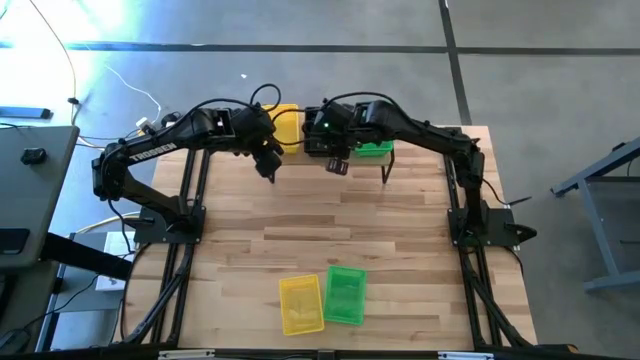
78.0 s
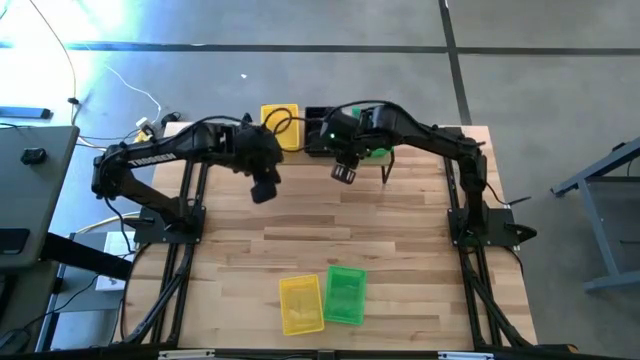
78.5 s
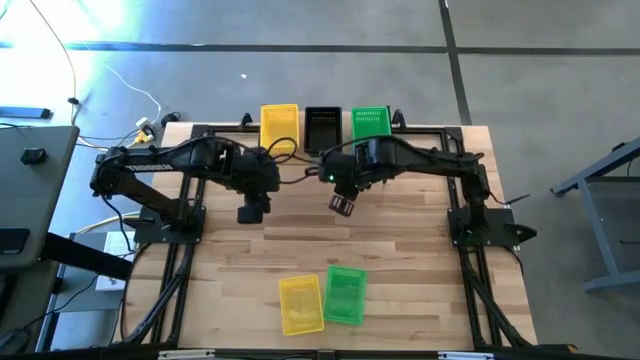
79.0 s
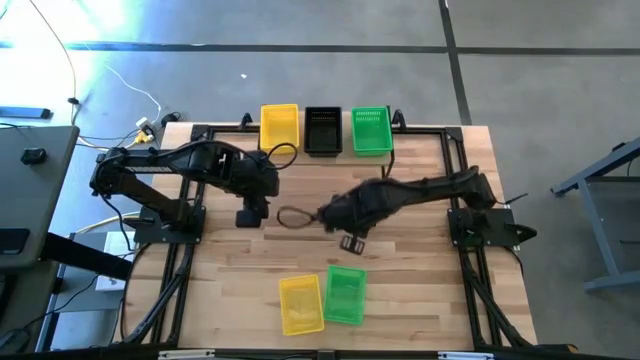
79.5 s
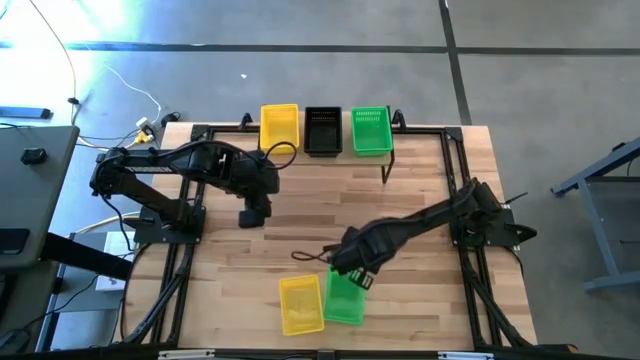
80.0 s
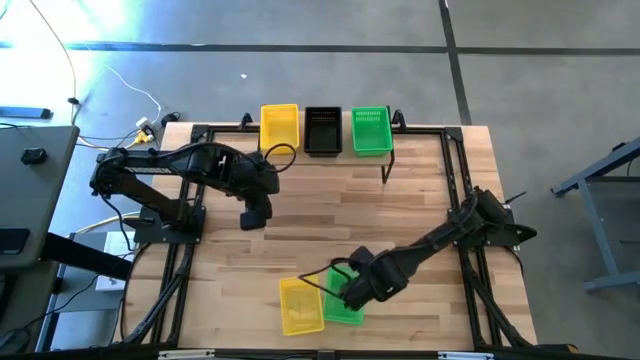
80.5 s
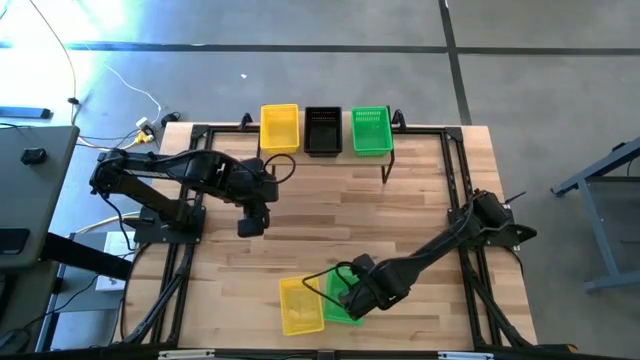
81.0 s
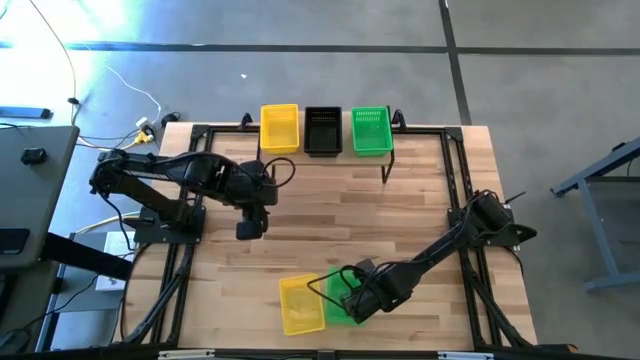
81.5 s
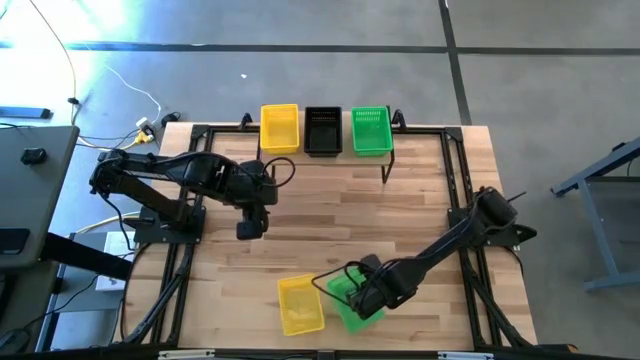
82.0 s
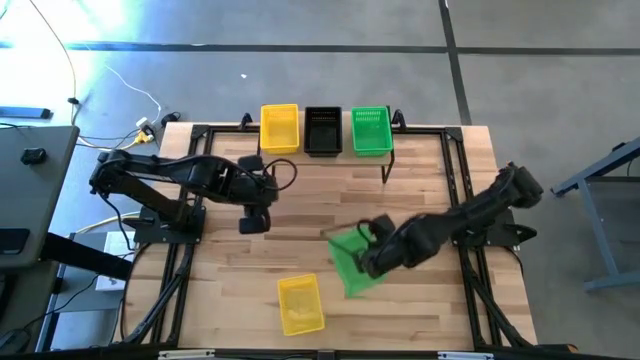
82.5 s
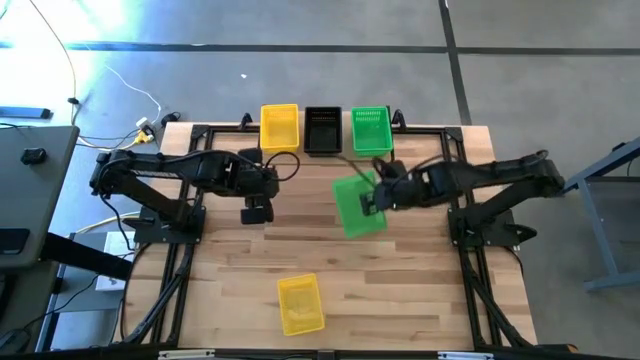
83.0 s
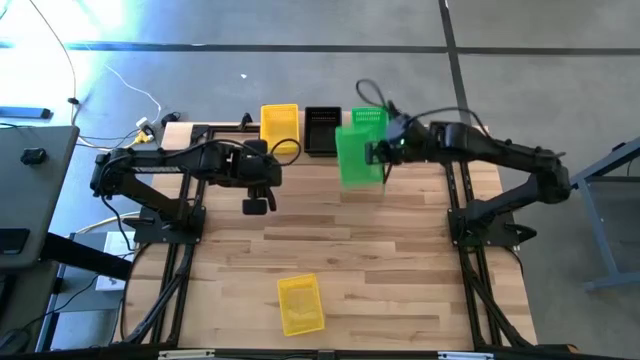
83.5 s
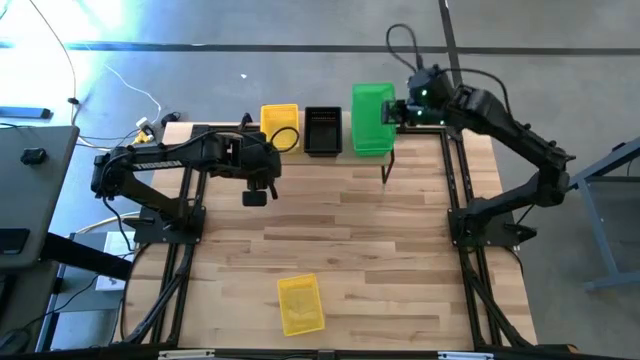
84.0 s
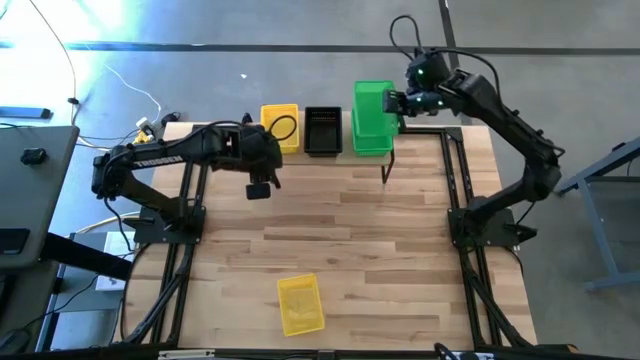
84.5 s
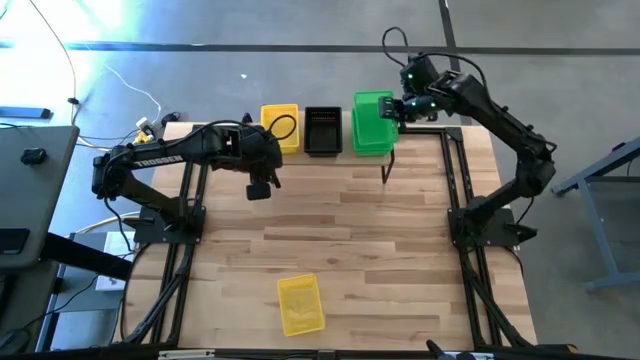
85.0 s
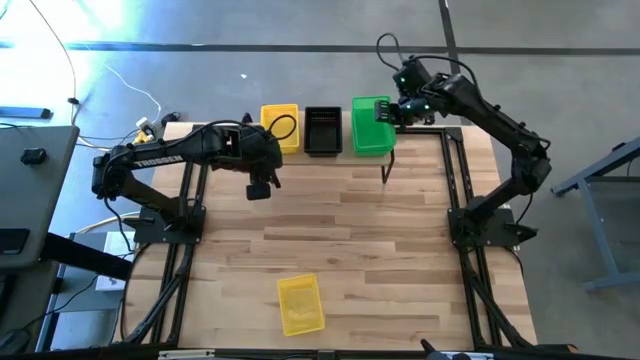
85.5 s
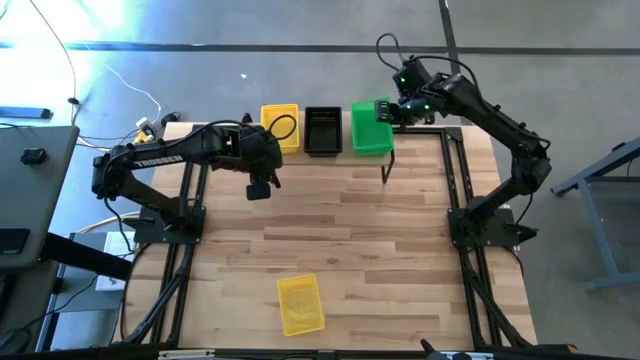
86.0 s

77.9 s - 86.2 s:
Task: Stack baskets on shelf by color
Stack the green bin on the green bin on the shelf

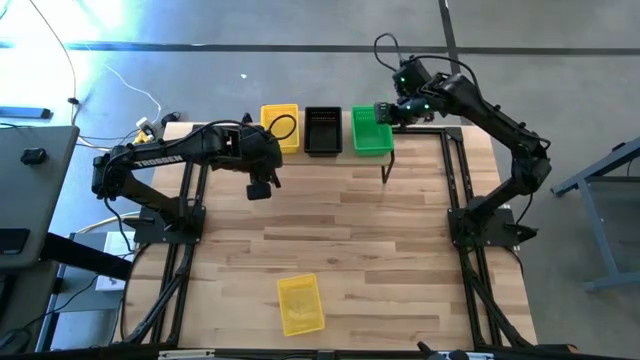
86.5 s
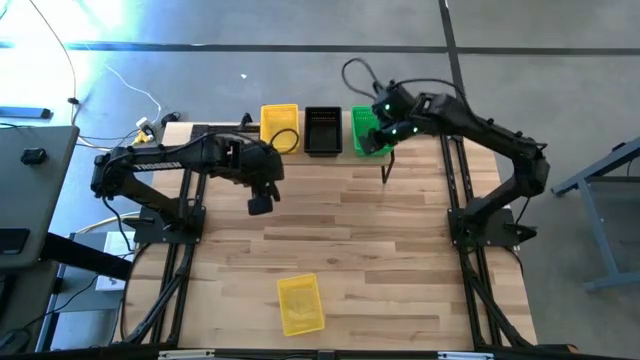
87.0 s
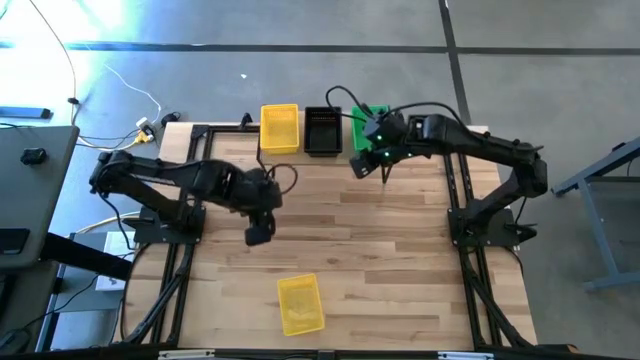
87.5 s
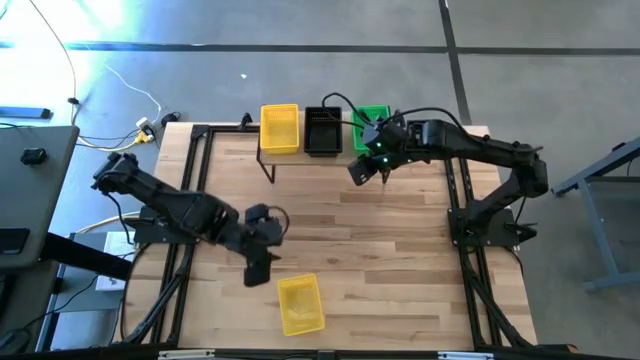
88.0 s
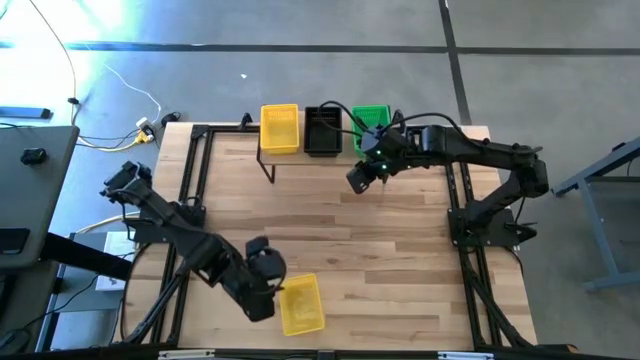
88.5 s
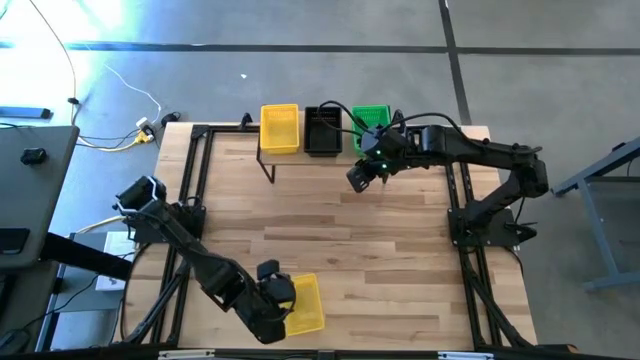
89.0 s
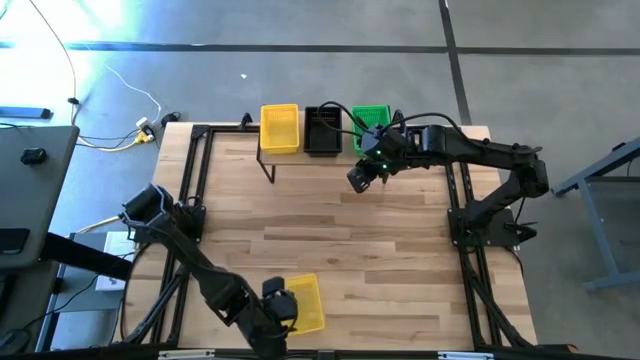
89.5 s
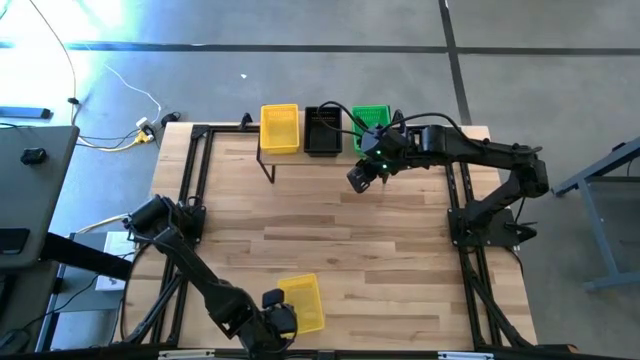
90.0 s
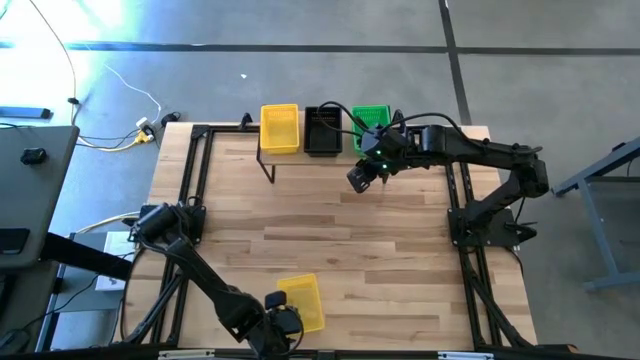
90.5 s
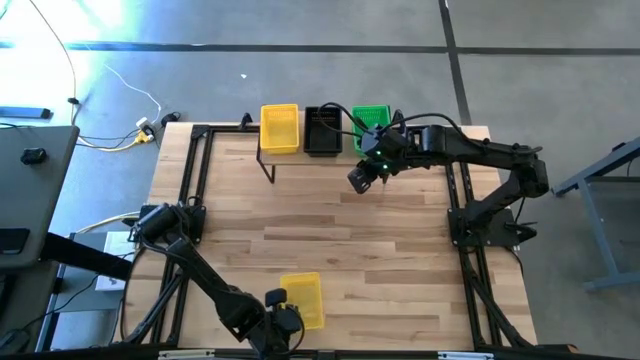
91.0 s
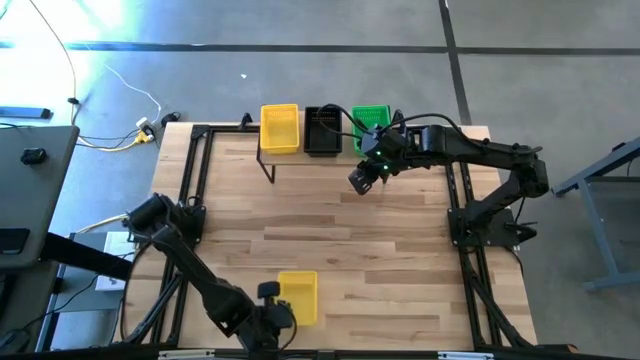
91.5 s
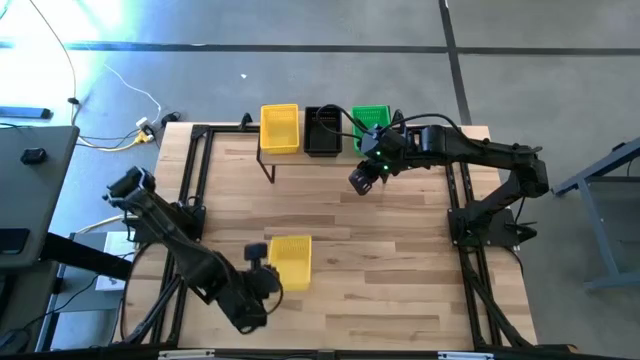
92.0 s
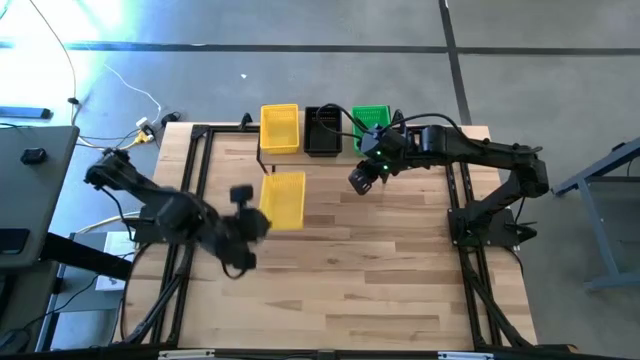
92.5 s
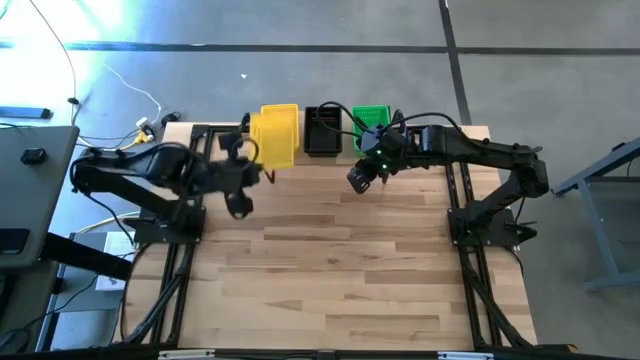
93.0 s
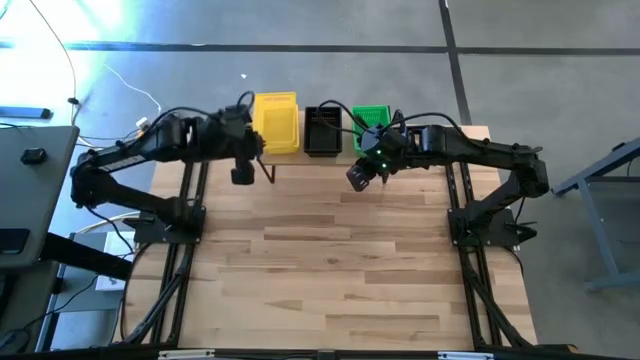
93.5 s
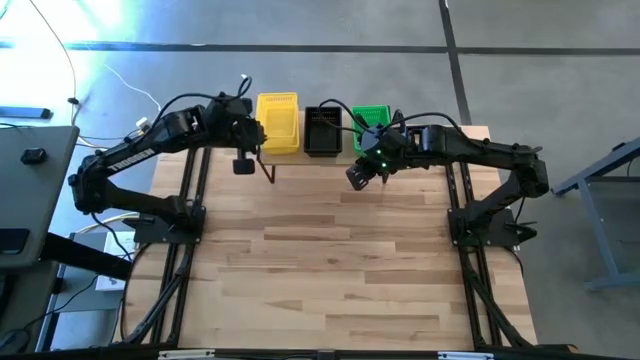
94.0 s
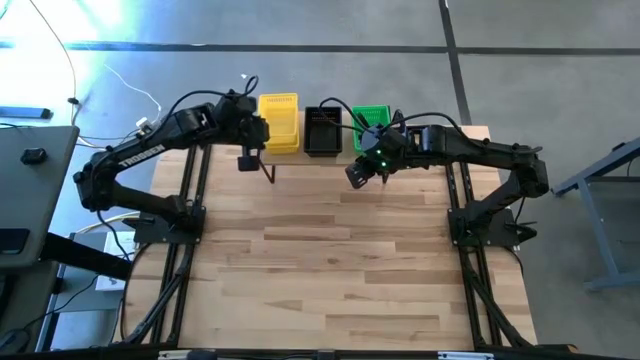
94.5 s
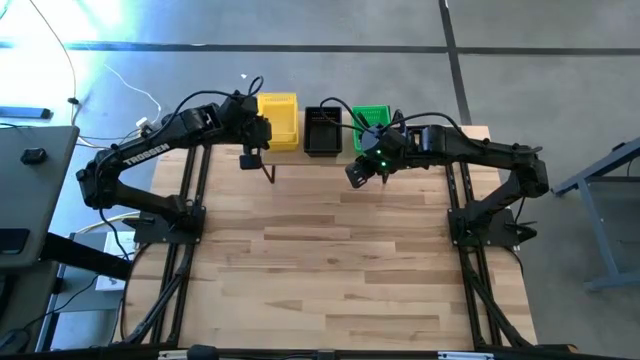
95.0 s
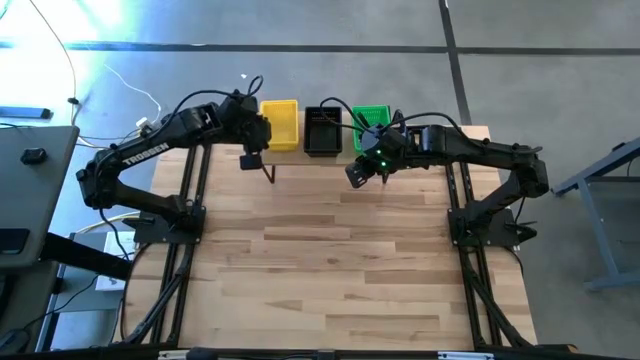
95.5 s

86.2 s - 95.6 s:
Stack the yellow bin on the yellow bin on the shelf

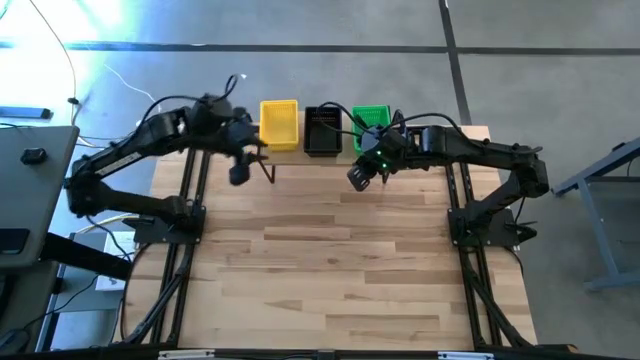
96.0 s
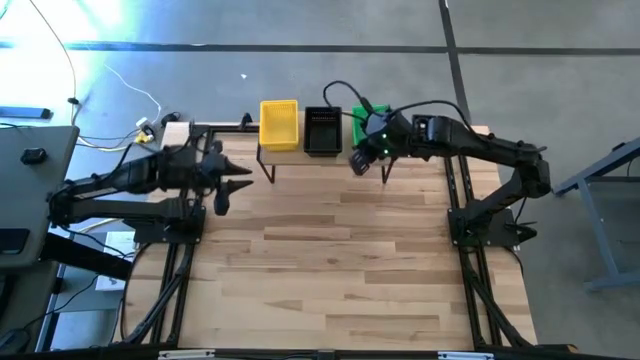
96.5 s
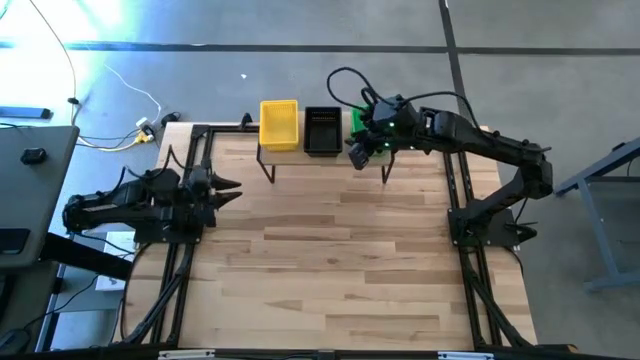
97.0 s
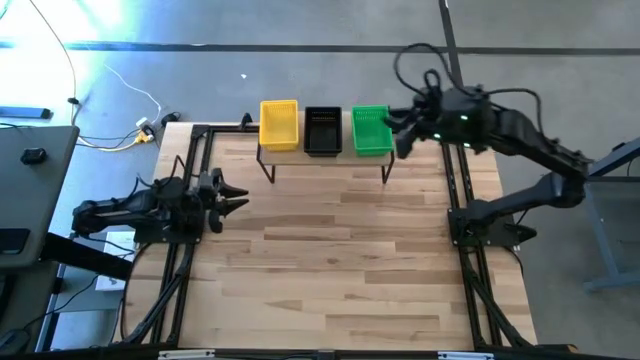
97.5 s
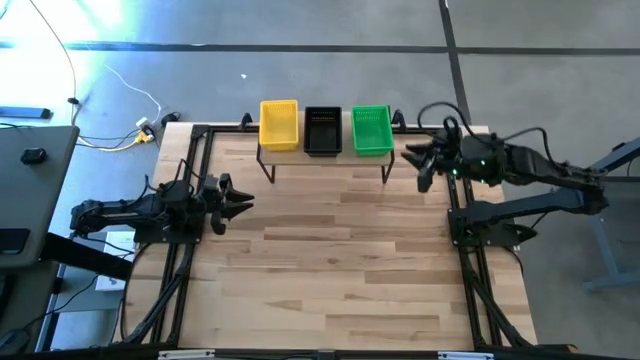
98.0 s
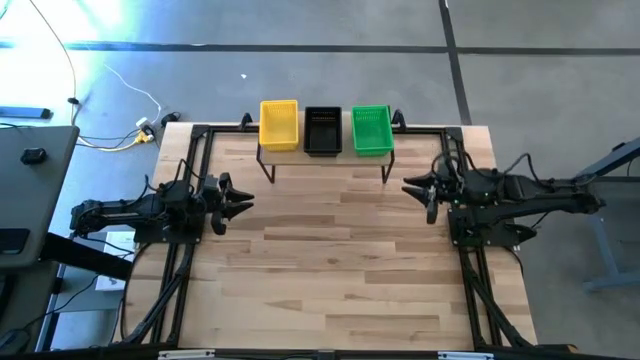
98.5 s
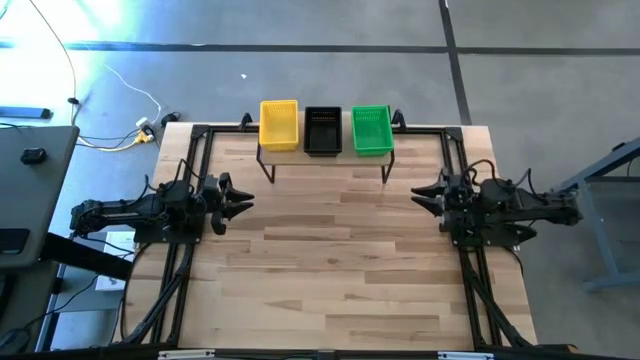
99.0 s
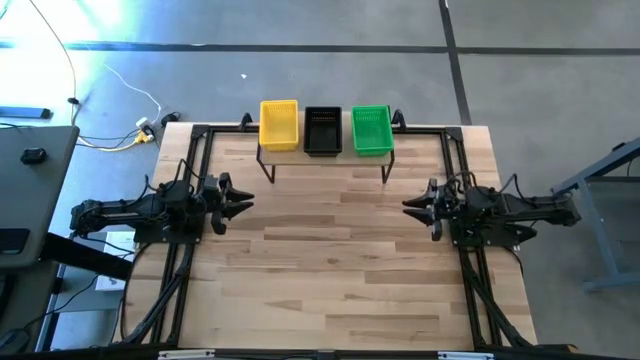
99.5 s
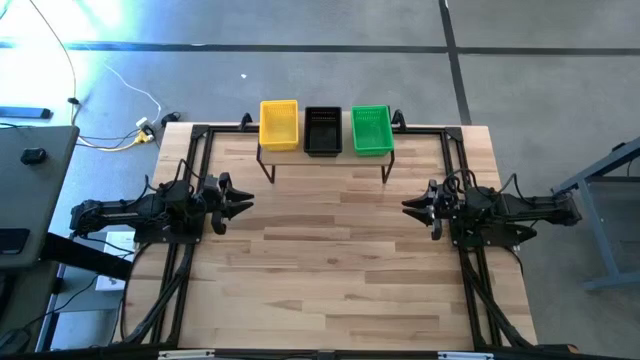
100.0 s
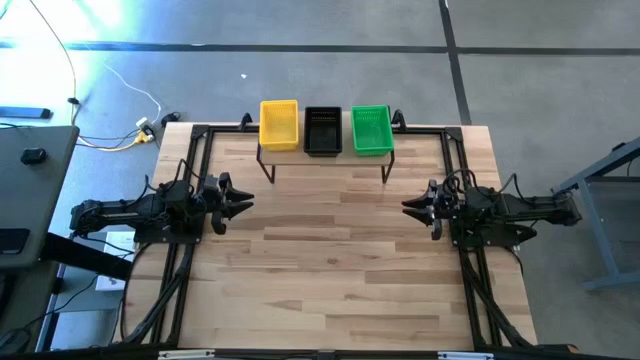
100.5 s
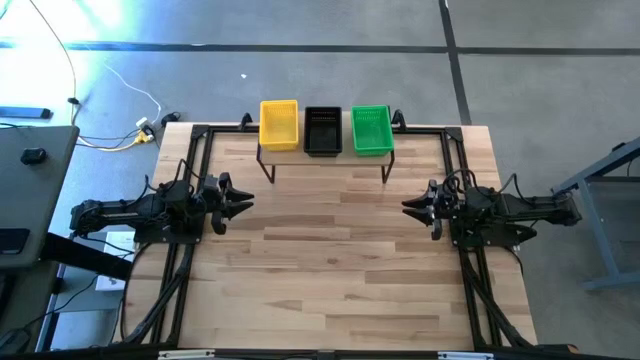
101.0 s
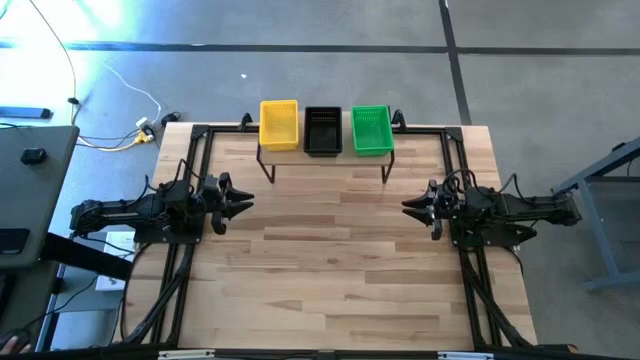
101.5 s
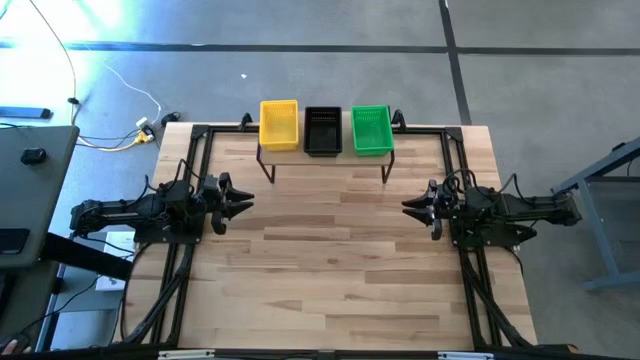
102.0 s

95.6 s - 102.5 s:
Return to Home Position
